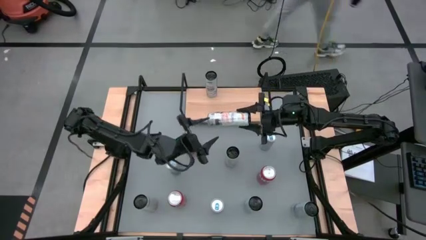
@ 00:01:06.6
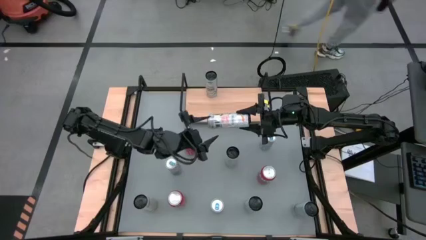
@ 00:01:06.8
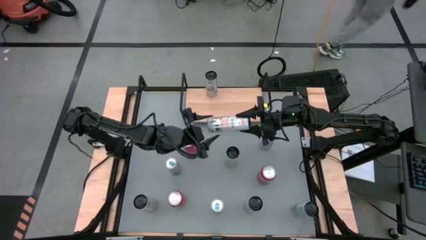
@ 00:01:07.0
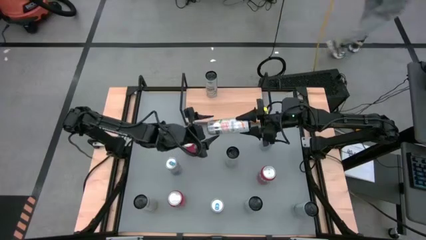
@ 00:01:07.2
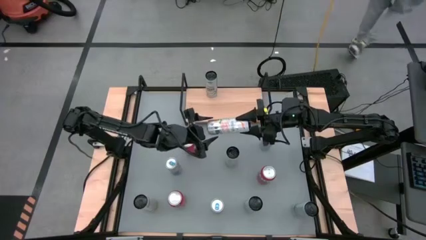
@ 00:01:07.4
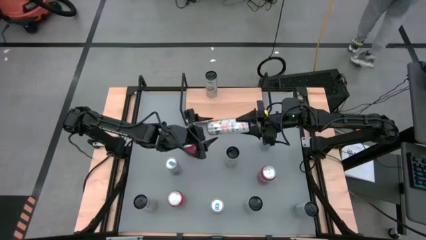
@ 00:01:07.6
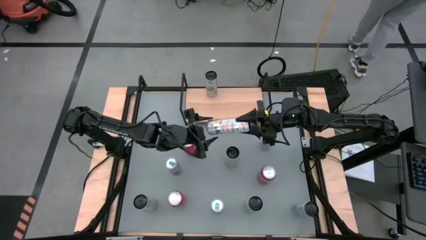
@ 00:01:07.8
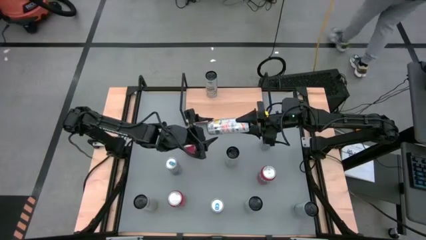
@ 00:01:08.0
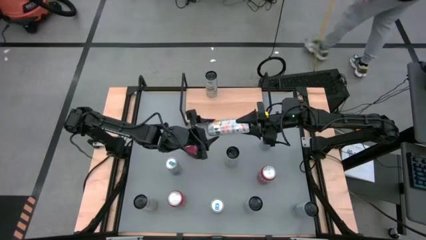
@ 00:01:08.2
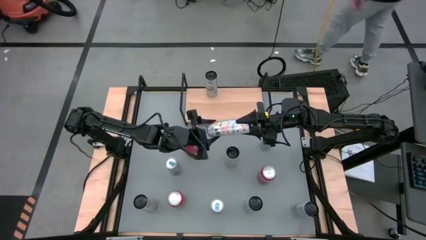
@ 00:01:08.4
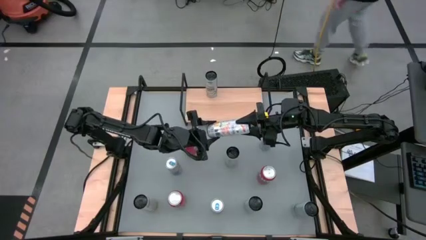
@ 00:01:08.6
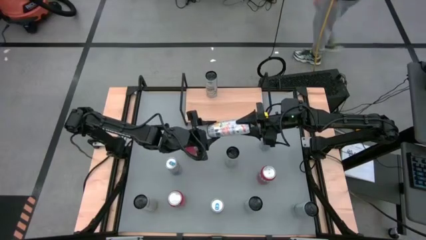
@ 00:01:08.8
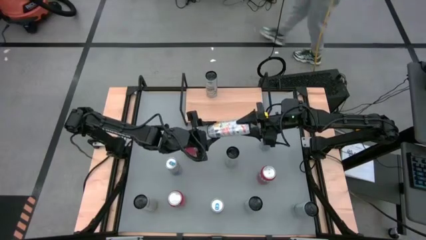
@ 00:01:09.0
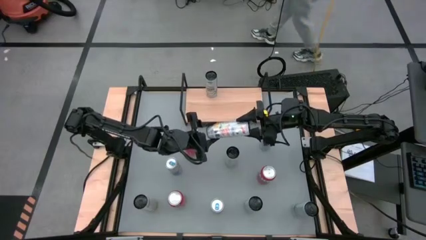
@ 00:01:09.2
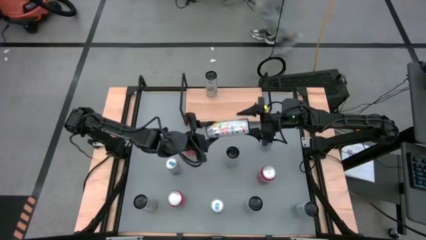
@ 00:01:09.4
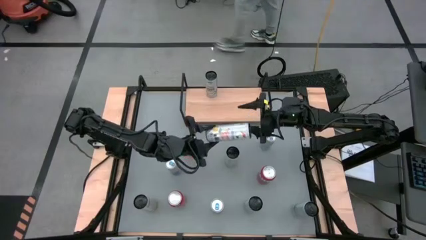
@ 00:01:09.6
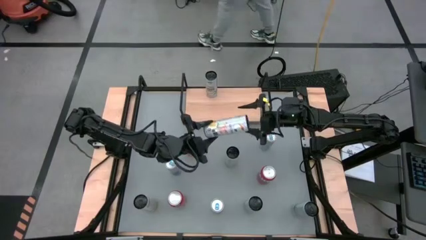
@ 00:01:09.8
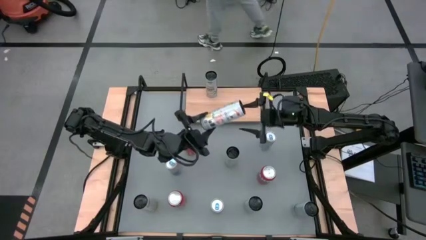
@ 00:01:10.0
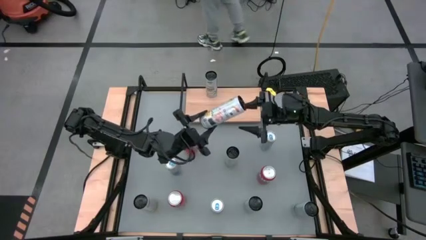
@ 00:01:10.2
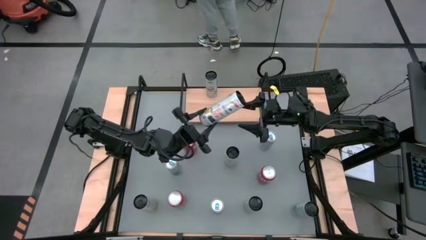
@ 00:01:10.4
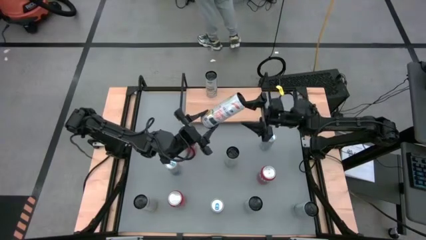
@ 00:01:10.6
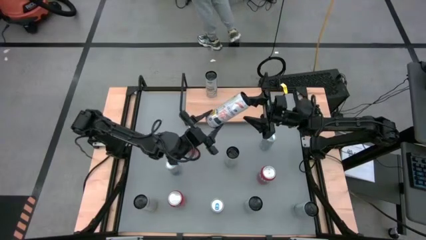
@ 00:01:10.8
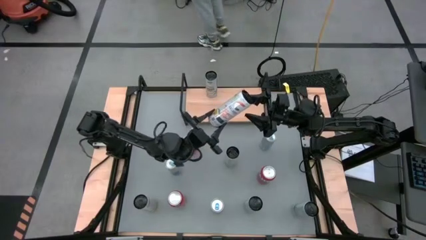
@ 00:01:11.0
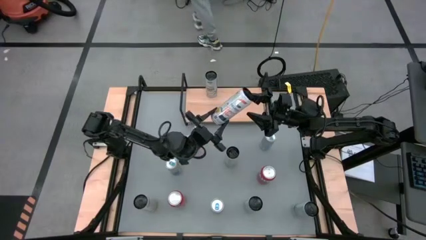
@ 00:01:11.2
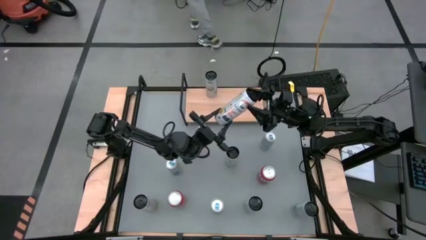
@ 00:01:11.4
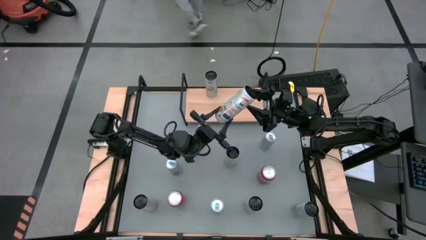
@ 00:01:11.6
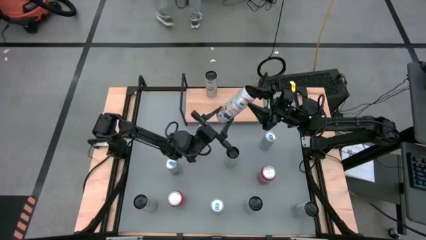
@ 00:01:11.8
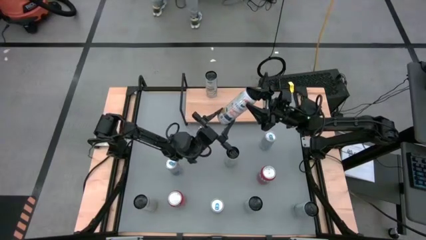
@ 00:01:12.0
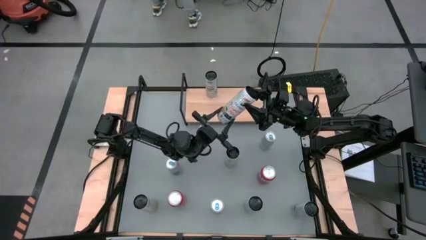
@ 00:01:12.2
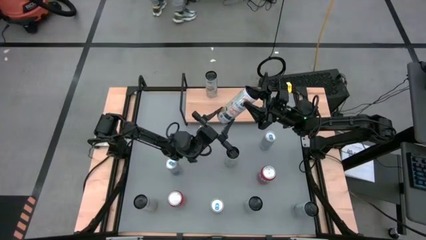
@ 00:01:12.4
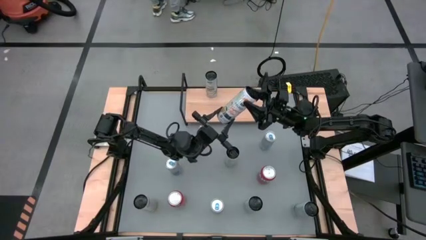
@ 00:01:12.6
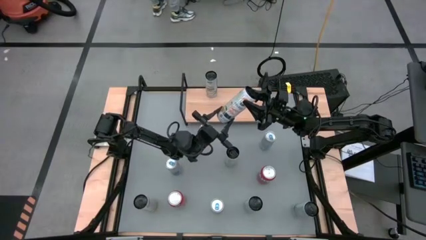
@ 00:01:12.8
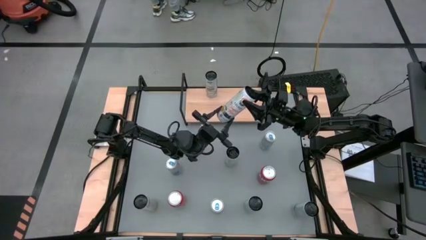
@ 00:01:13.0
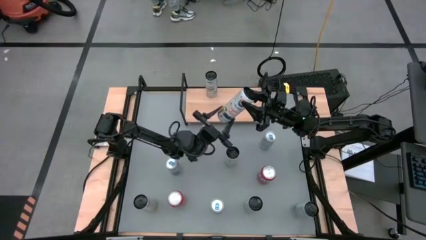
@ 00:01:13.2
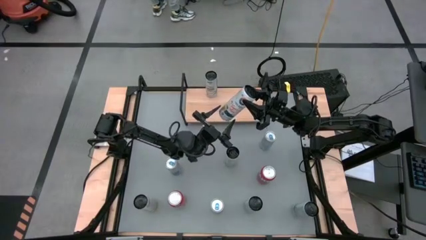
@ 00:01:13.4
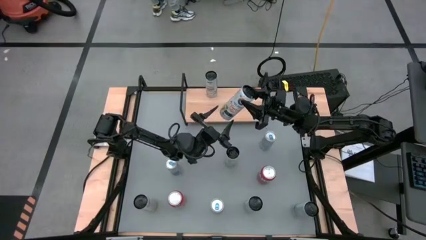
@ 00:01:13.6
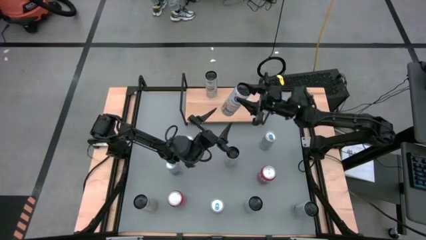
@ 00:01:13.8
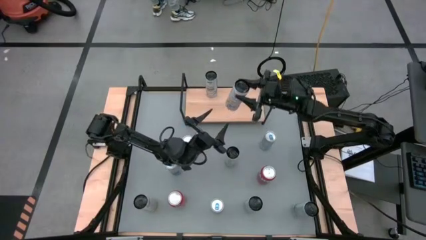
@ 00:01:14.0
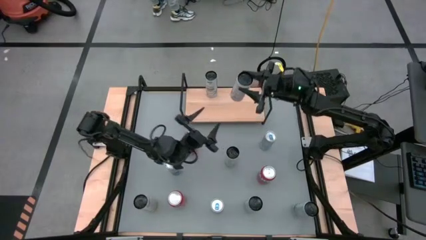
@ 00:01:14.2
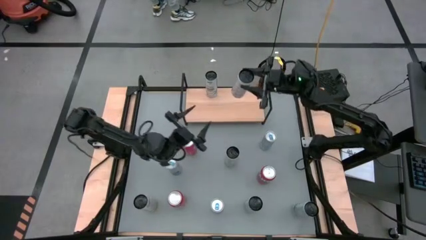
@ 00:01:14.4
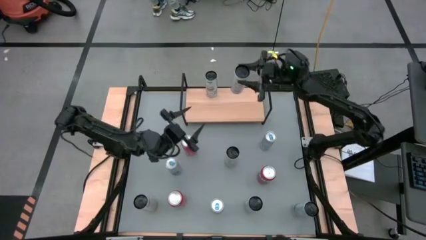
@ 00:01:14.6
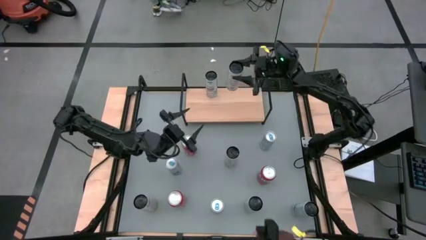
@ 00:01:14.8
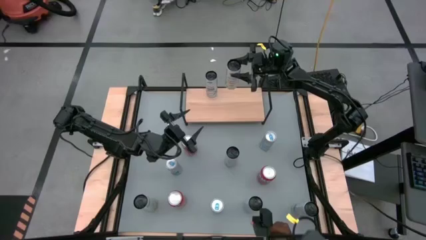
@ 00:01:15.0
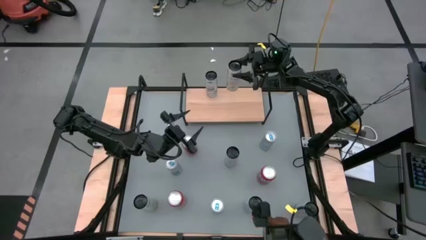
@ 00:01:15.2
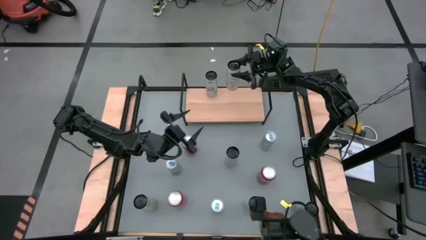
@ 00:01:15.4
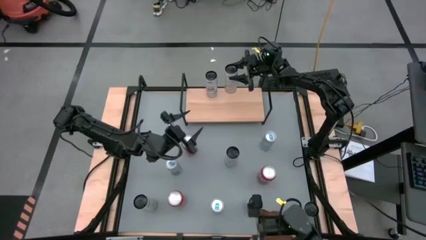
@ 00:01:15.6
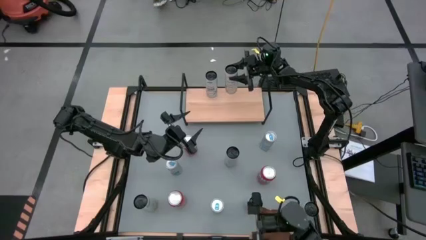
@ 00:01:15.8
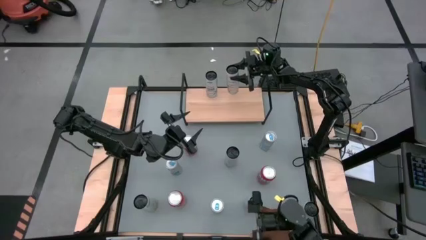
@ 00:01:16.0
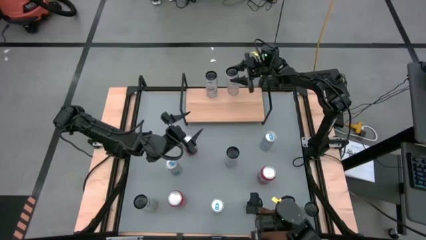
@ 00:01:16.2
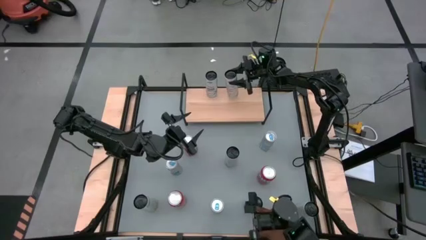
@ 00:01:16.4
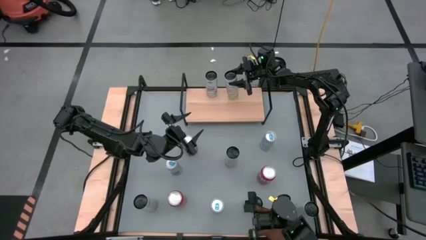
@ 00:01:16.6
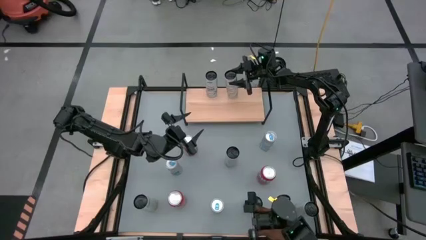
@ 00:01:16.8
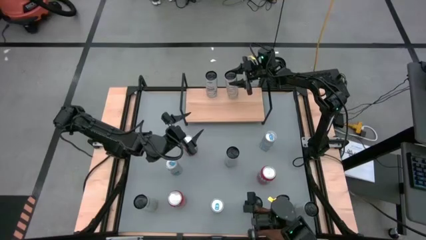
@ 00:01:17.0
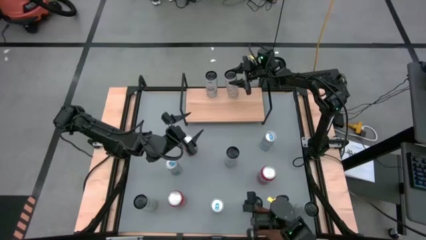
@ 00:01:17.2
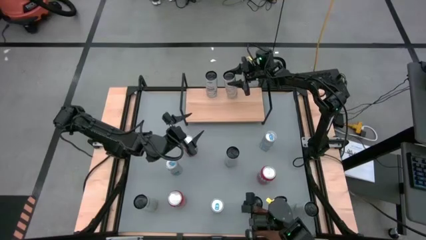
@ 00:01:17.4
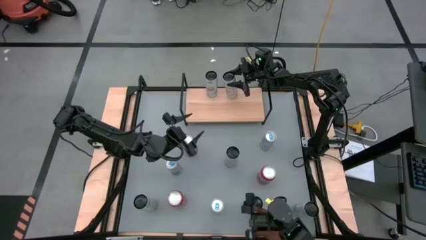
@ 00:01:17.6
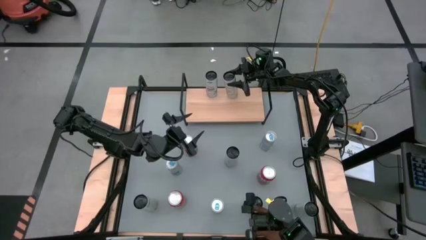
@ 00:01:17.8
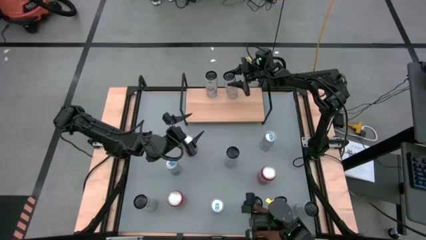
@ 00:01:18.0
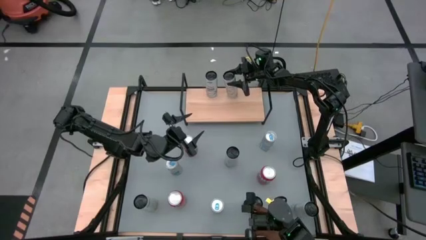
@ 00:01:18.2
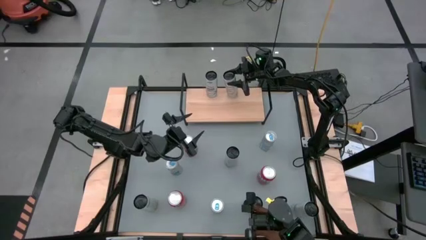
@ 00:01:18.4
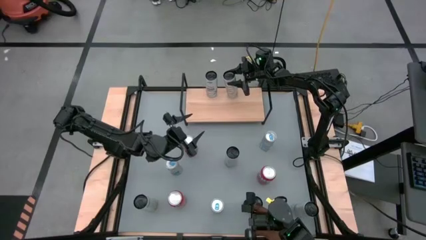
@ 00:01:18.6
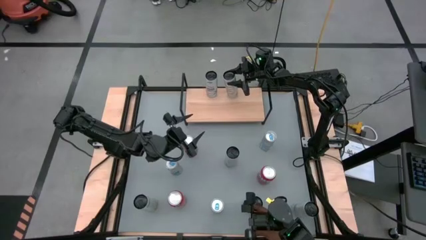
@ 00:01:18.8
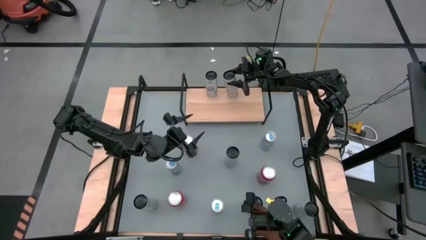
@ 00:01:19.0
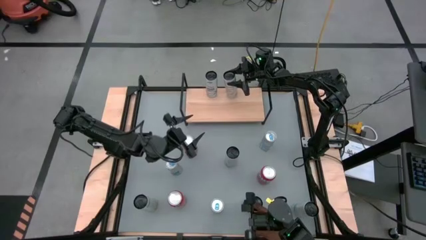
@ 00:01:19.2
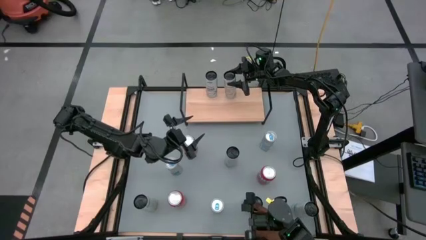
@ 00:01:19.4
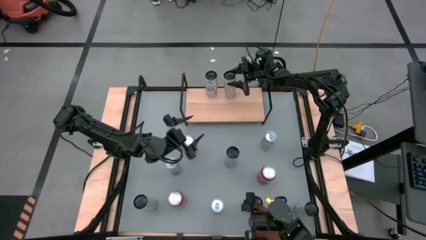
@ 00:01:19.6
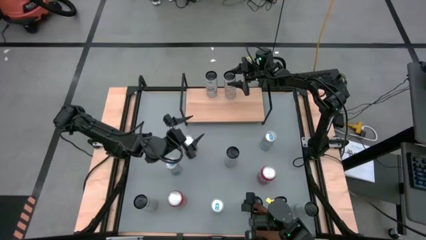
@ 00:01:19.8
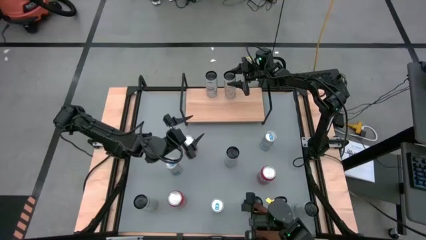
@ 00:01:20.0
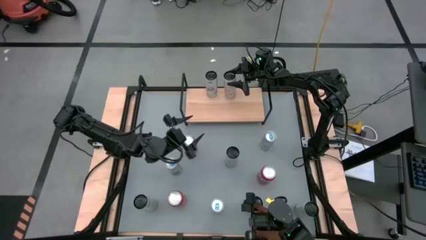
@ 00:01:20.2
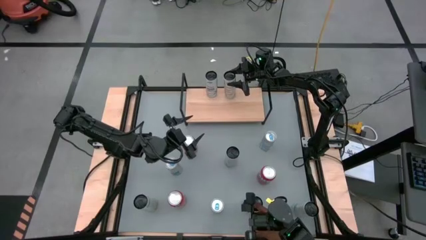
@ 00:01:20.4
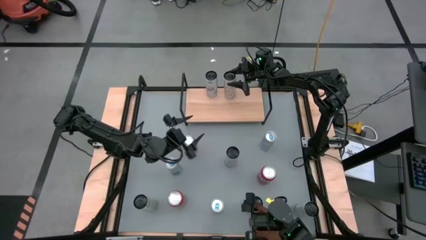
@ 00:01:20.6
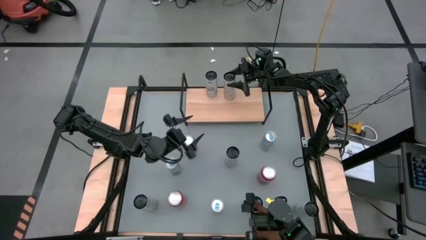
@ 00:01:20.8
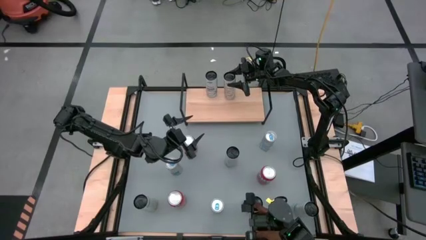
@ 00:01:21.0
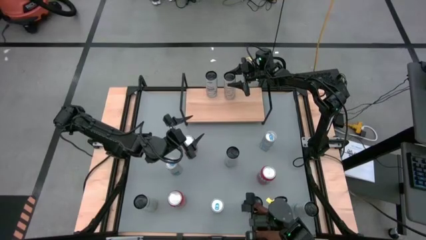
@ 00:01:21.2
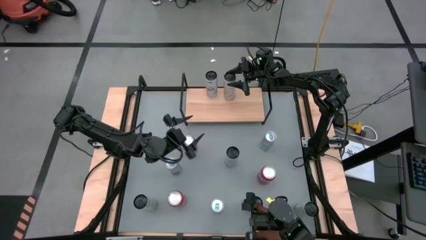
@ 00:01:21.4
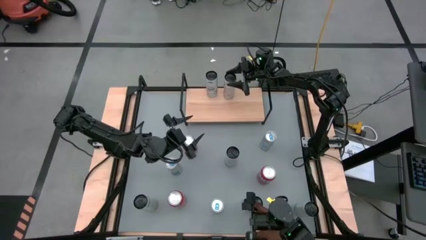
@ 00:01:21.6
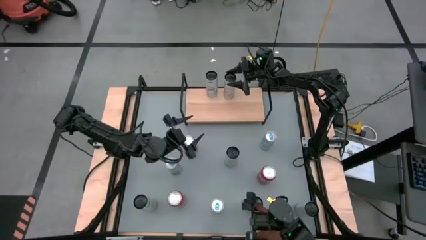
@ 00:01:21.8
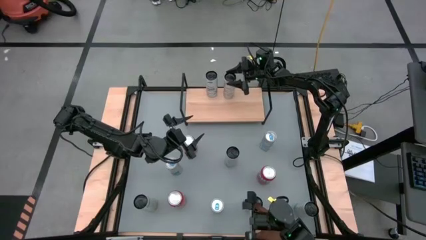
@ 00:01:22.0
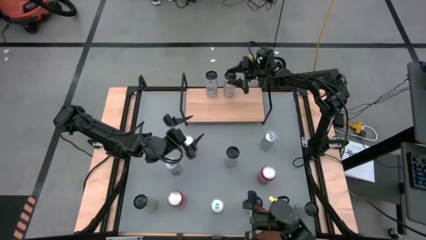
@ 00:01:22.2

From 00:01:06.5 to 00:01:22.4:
Task: Place canned beverage on shelf
Put the top right white yellow soda can on the shelf
